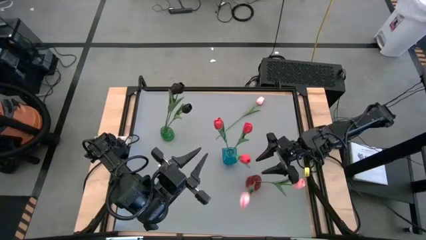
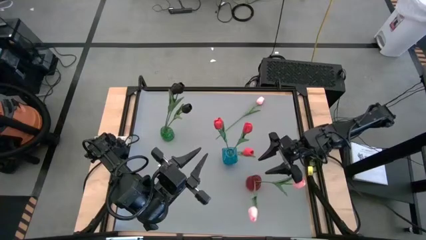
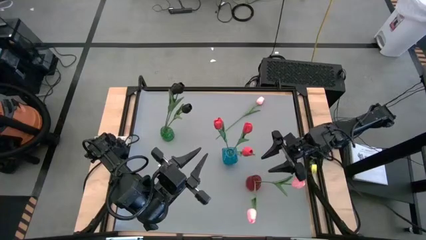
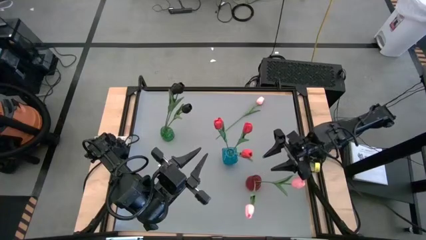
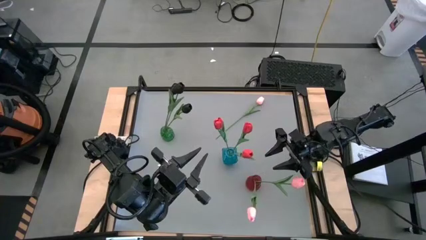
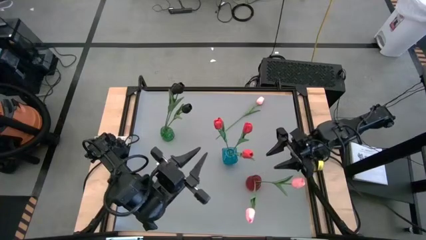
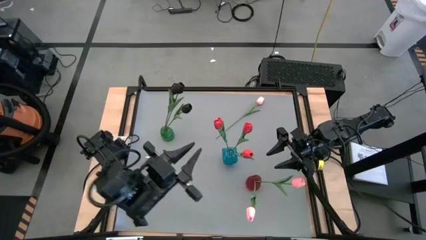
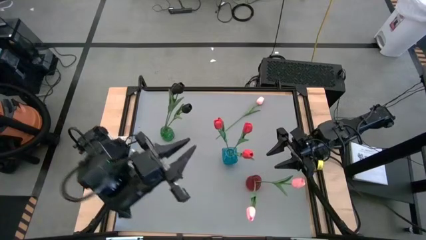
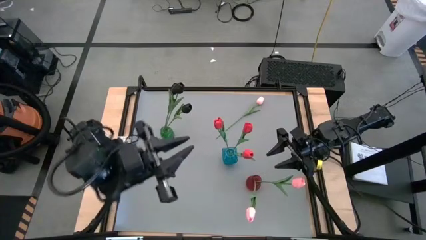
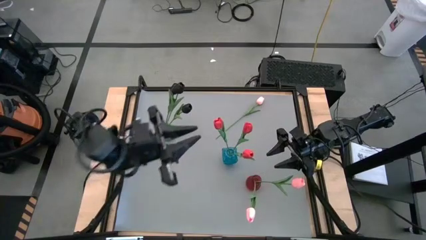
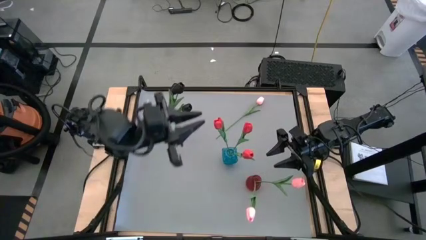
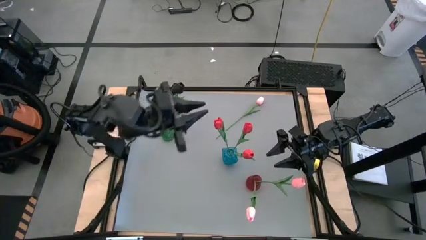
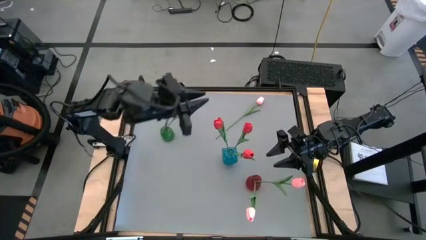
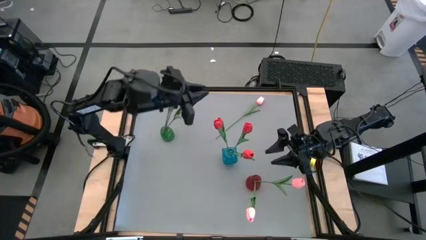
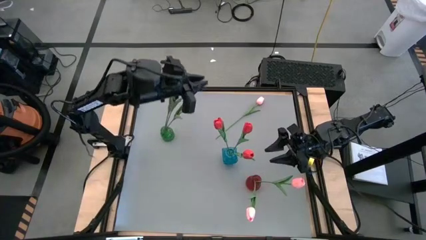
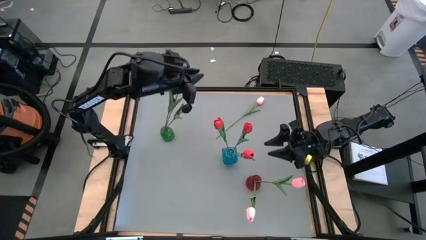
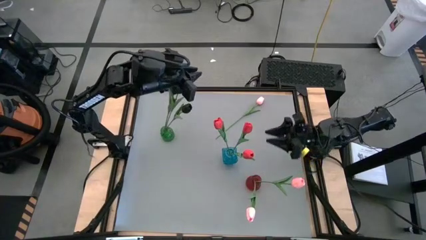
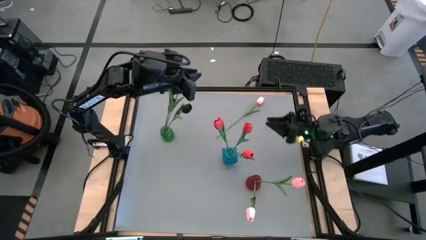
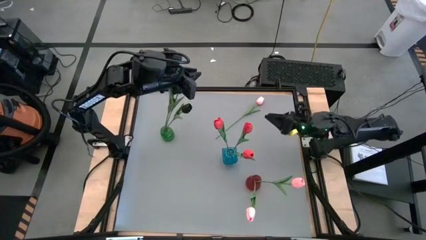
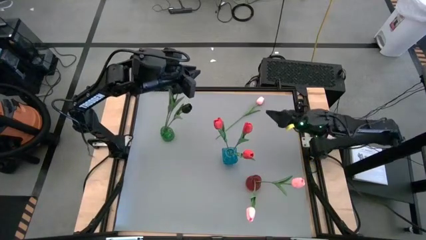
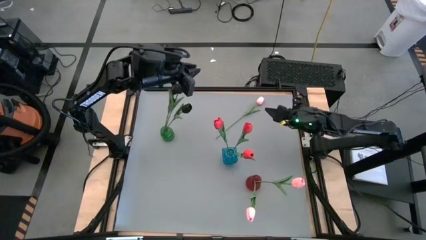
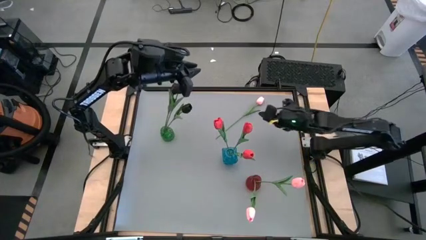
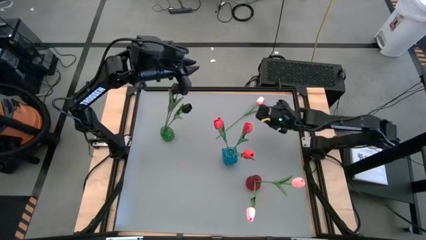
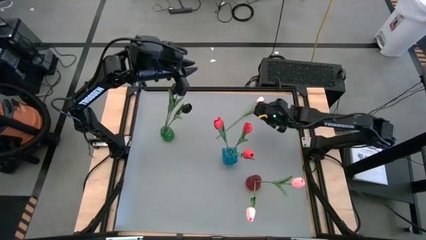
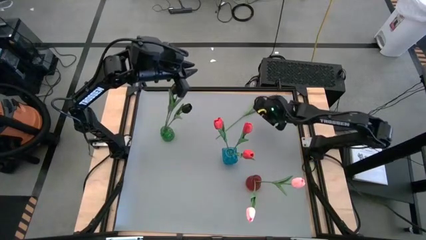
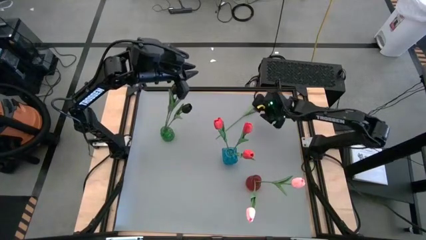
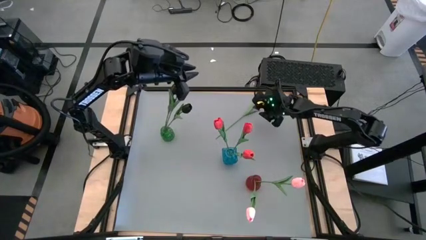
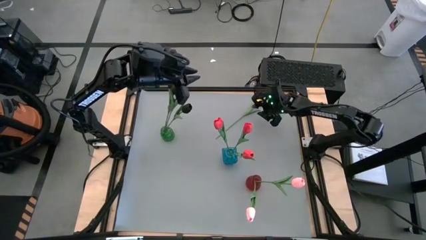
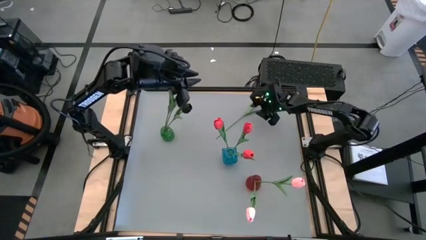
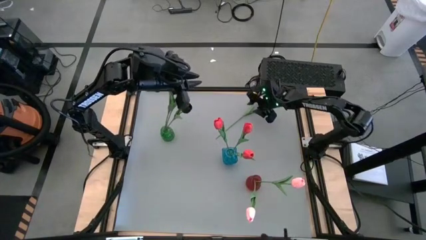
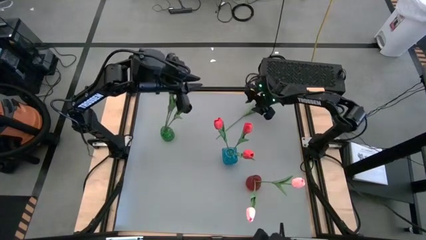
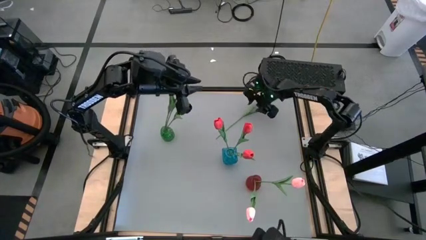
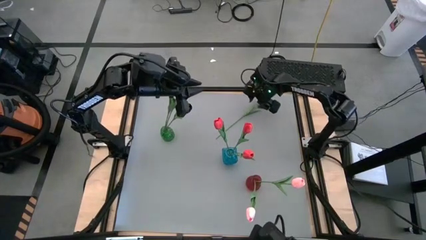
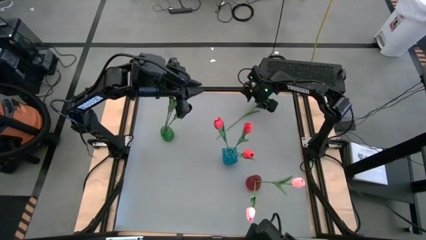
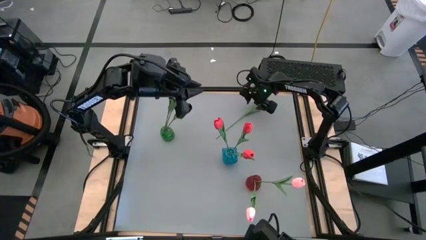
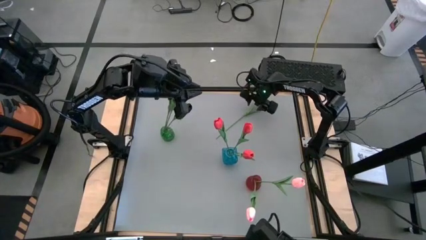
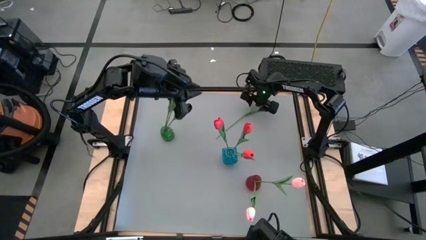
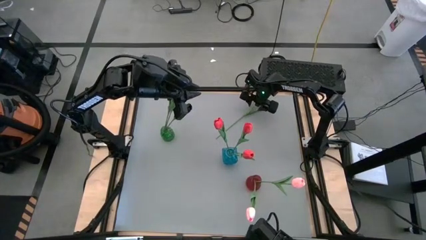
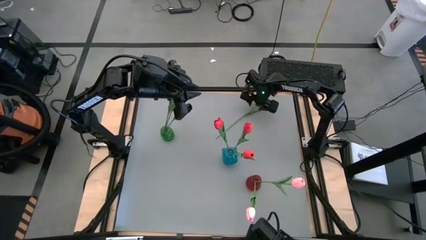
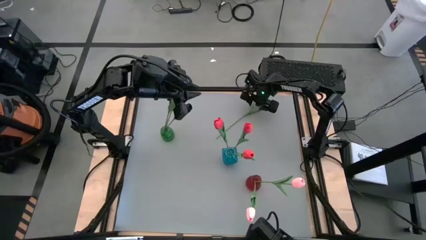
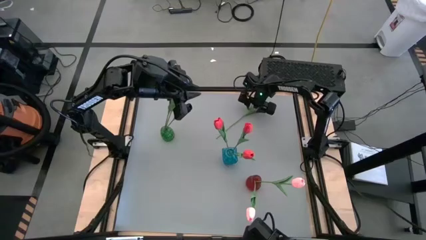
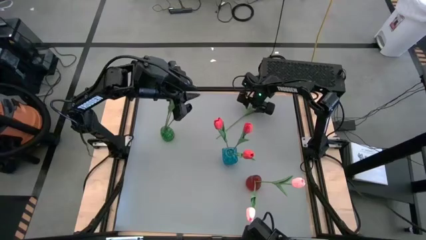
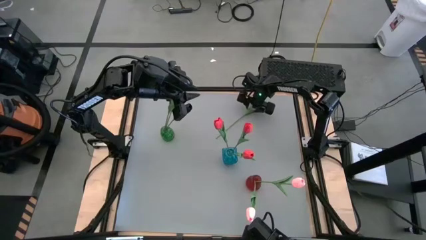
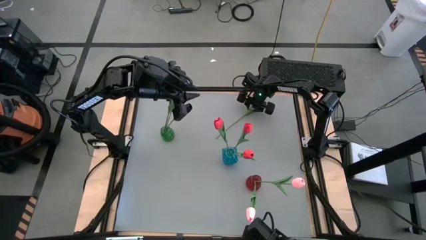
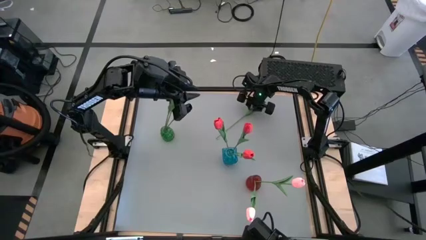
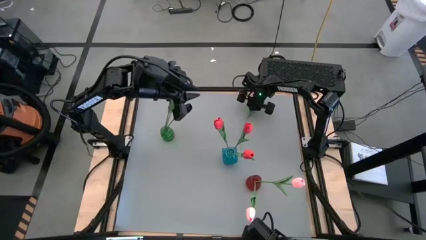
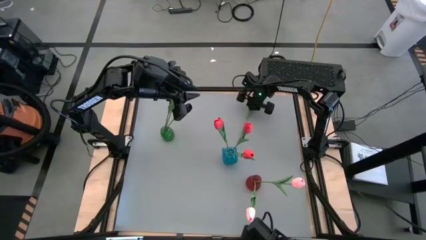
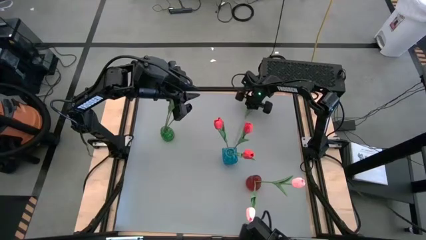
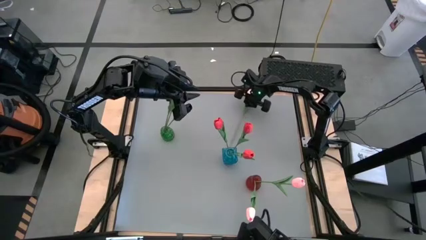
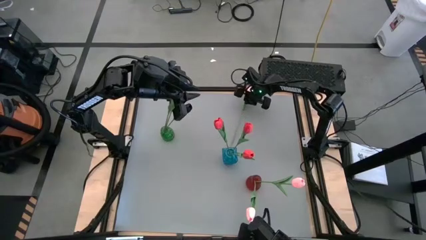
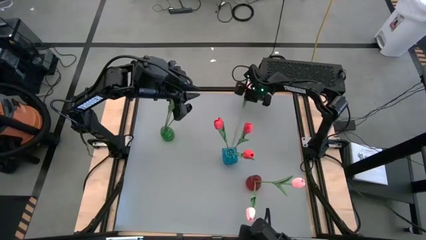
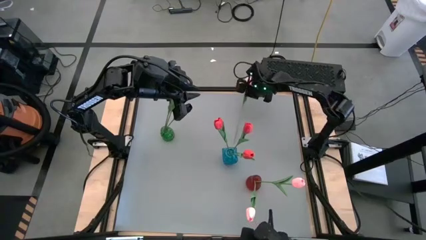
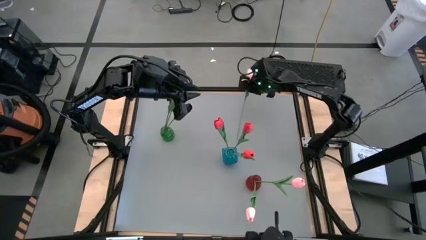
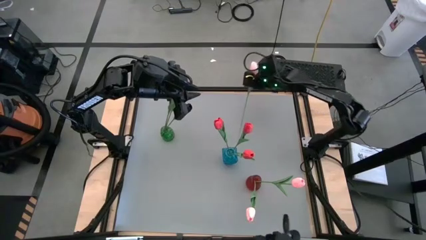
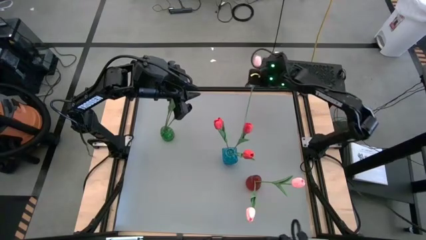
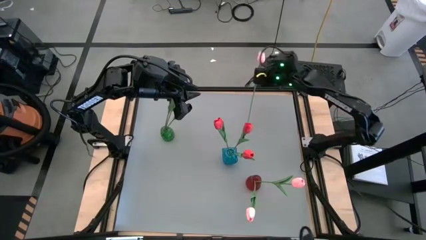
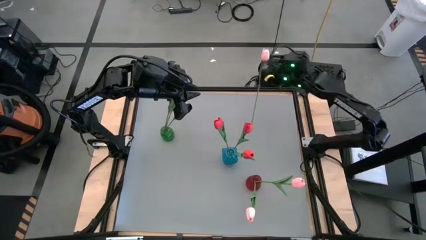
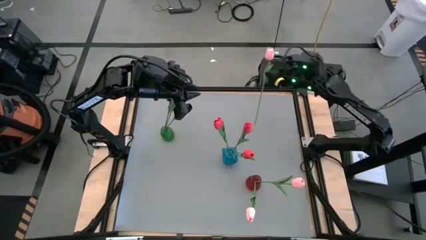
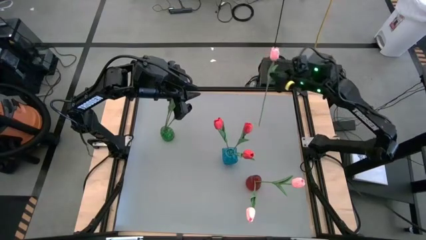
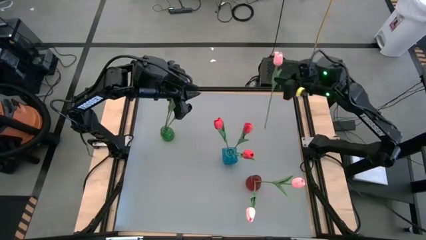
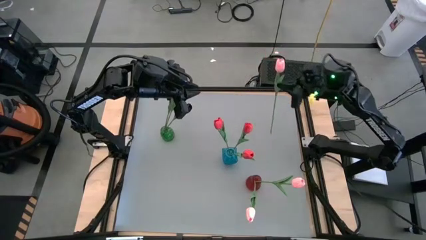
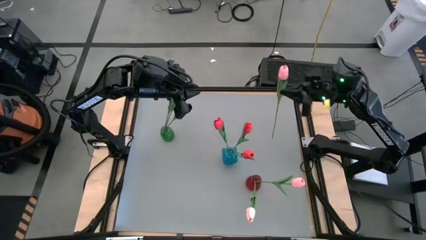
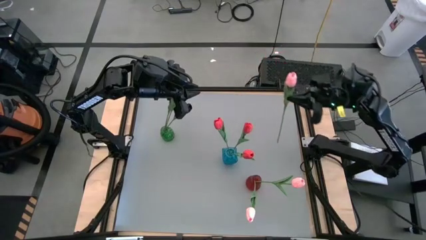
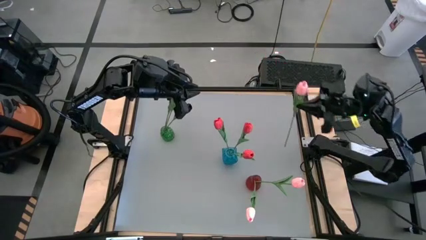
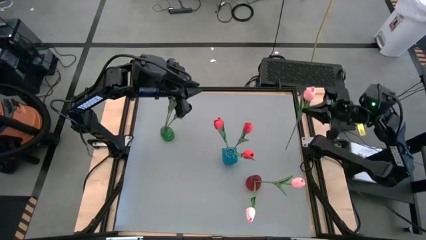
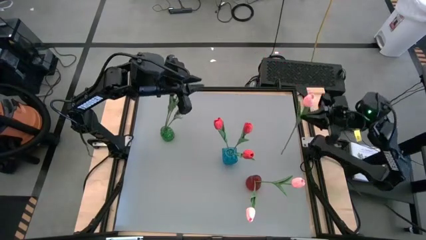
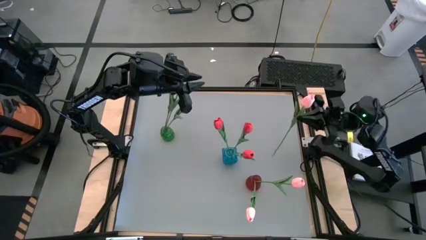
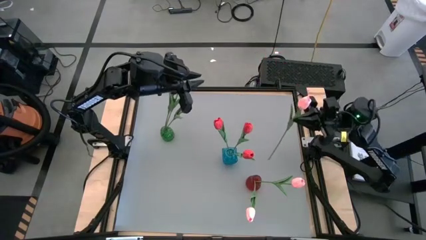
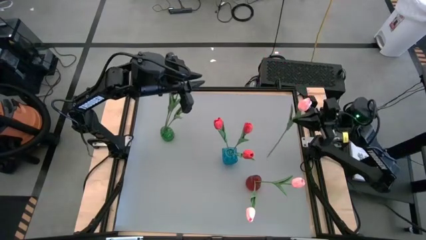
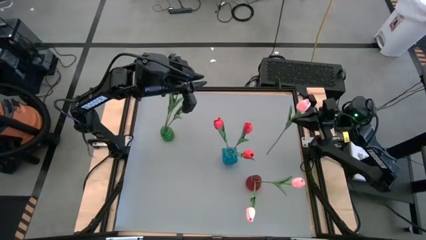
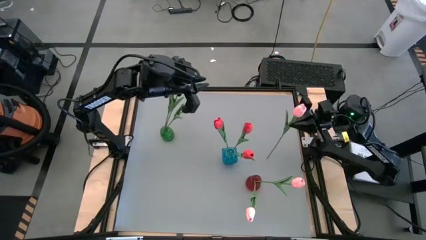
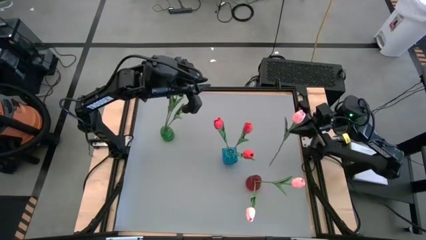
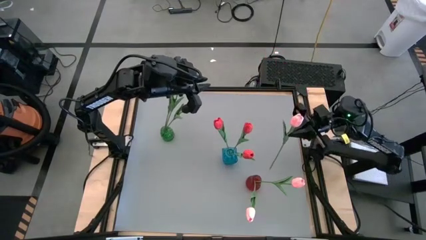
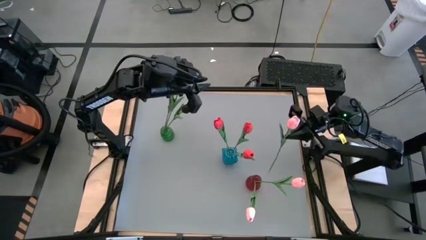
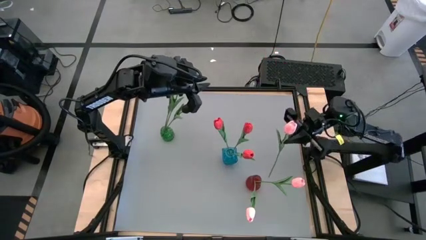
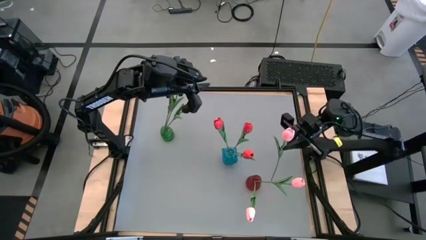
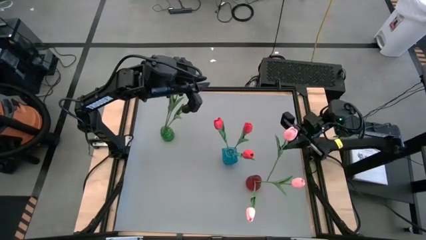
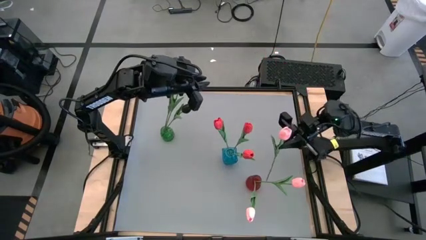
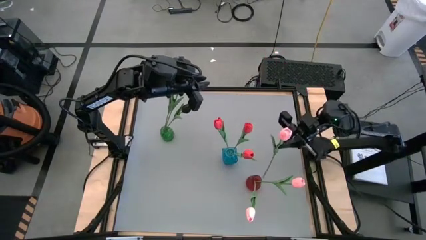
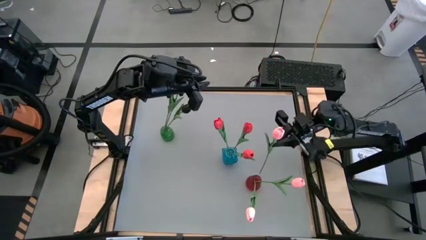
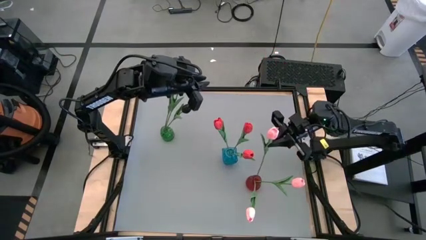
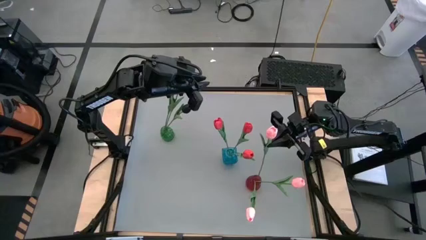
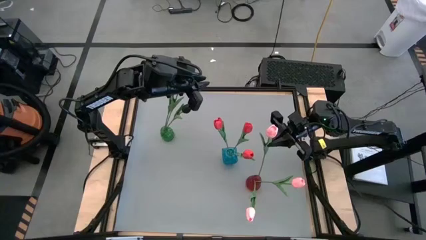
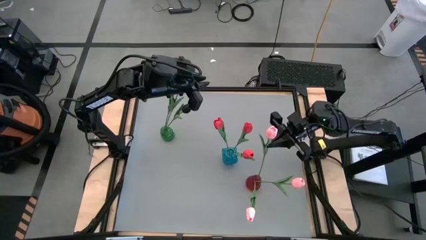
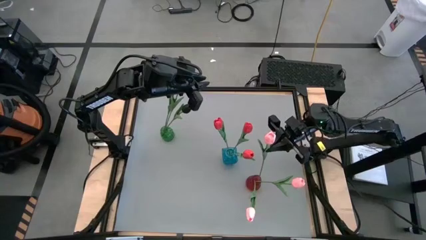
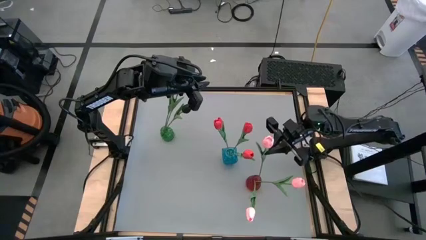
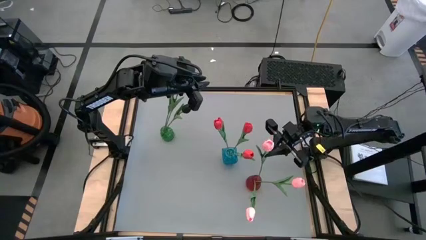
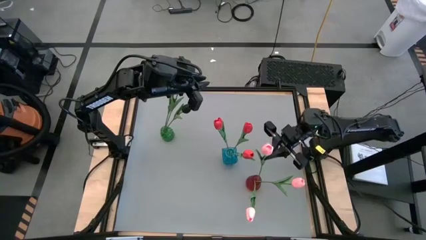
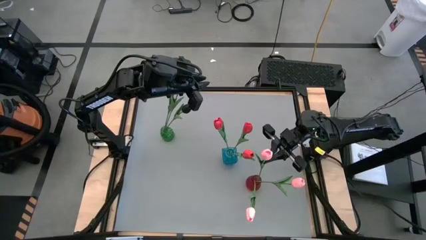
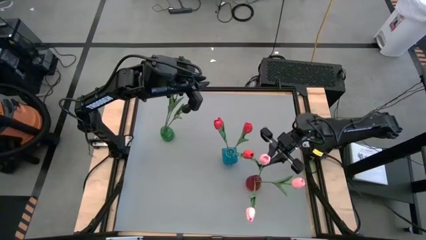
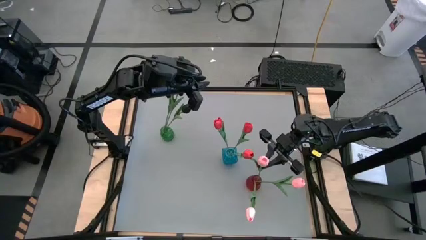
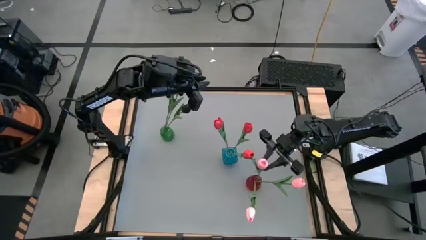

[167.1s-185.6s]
Task: Sort flowers into vase by color
Put the pink tulip into the red vase
